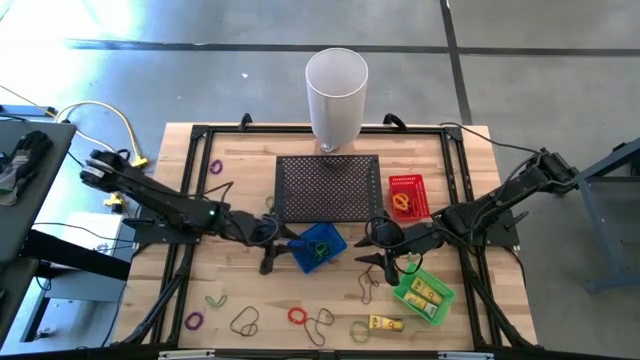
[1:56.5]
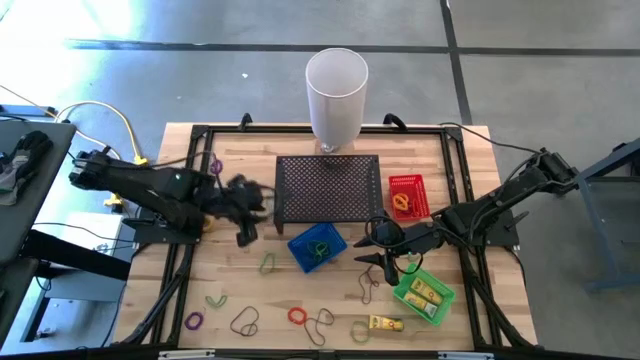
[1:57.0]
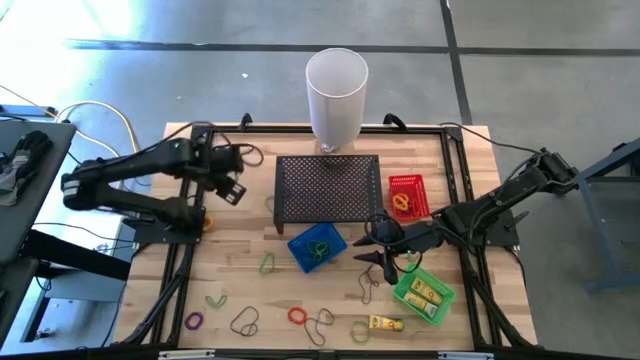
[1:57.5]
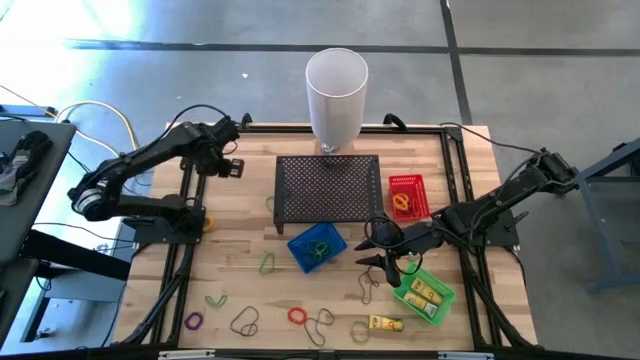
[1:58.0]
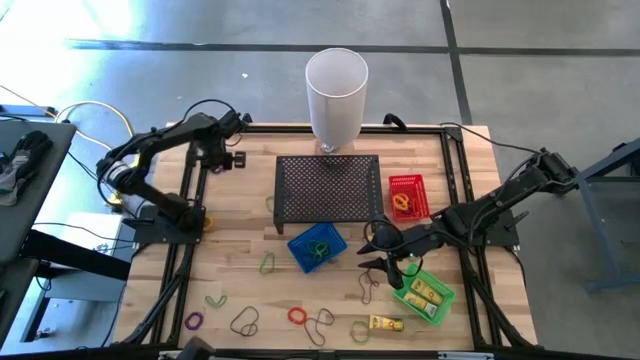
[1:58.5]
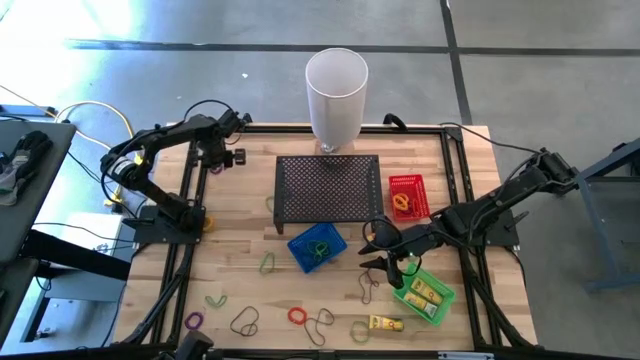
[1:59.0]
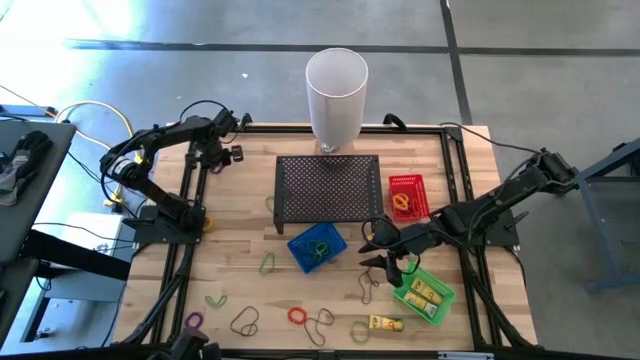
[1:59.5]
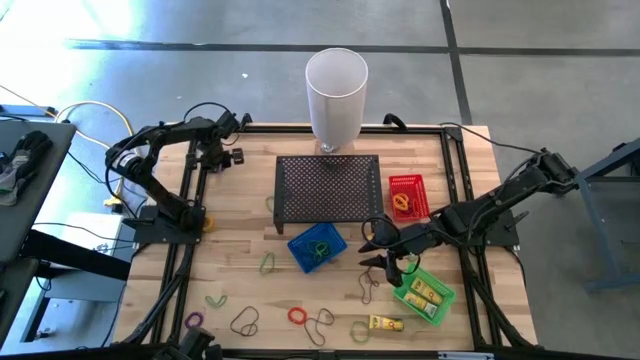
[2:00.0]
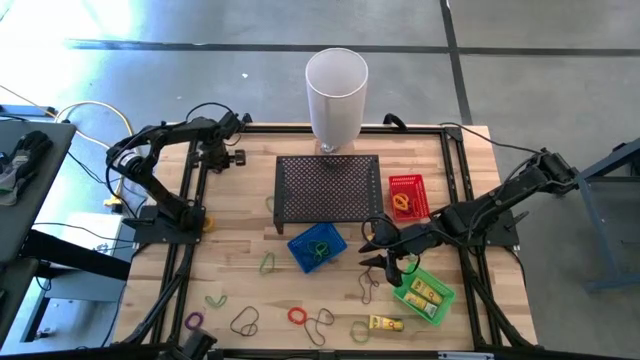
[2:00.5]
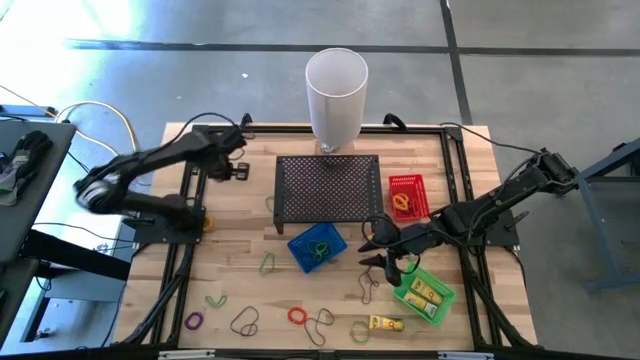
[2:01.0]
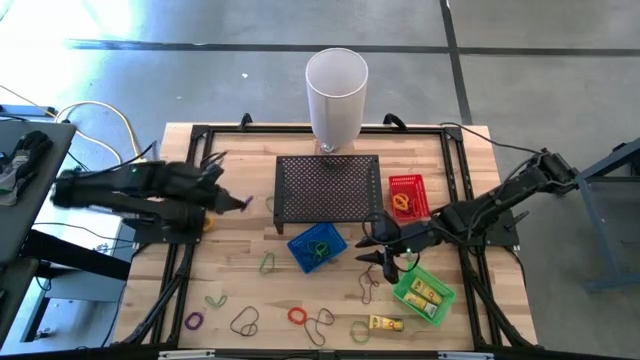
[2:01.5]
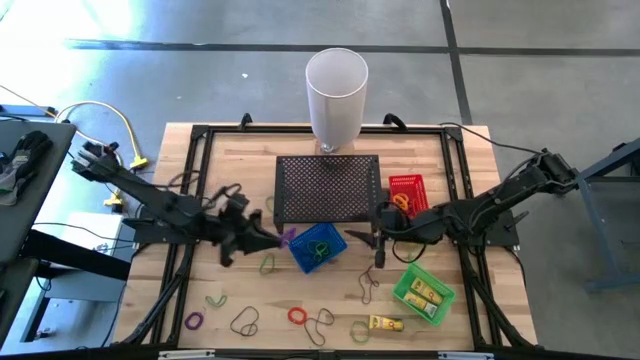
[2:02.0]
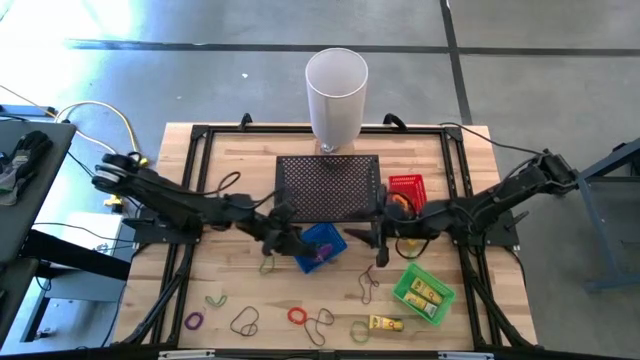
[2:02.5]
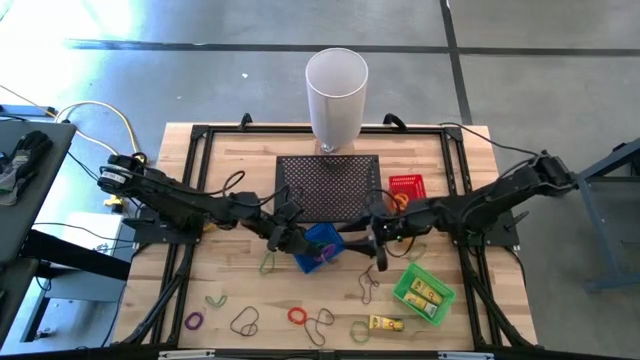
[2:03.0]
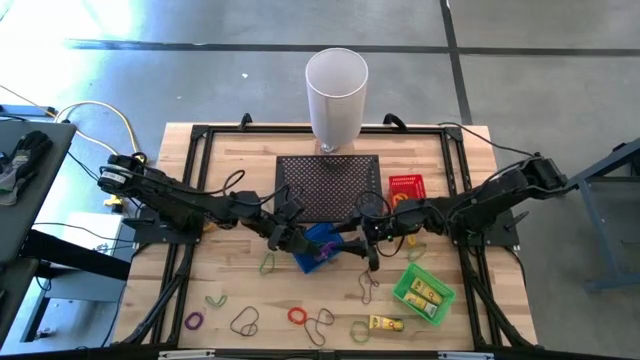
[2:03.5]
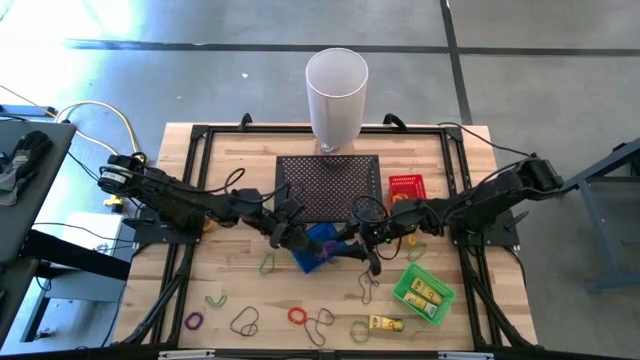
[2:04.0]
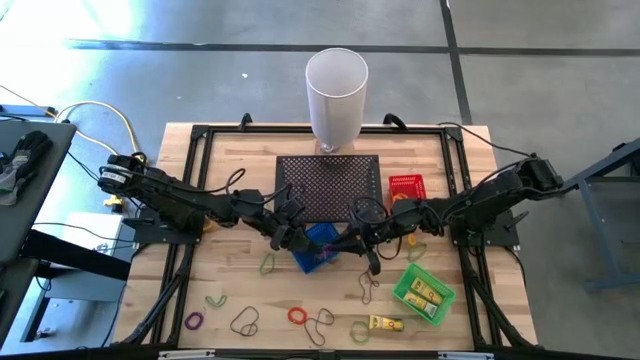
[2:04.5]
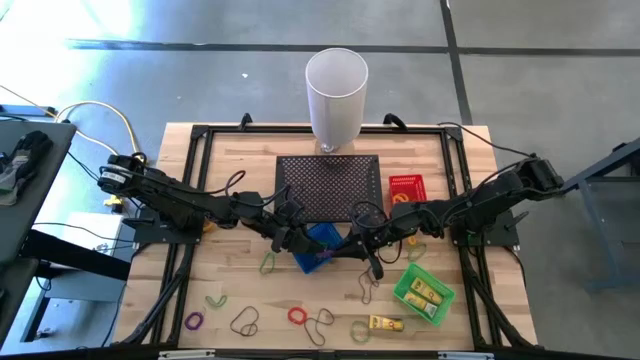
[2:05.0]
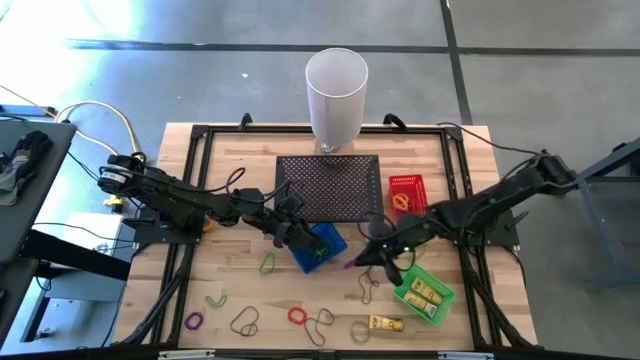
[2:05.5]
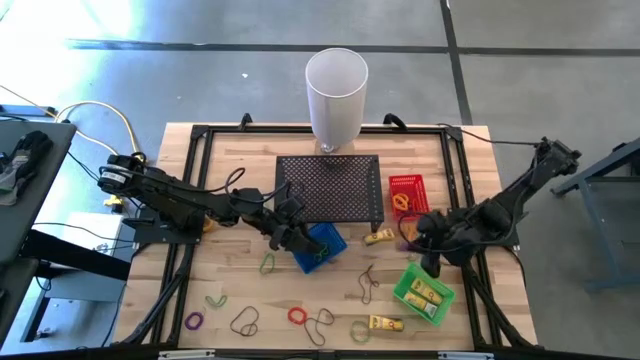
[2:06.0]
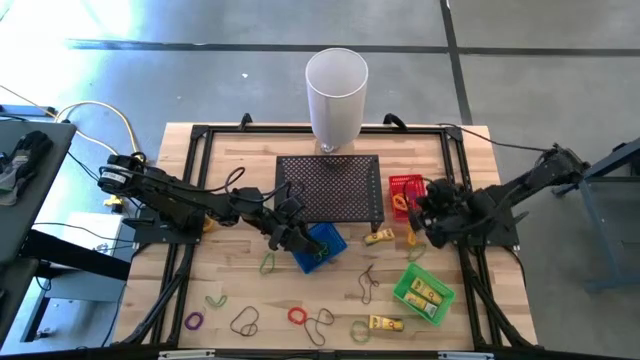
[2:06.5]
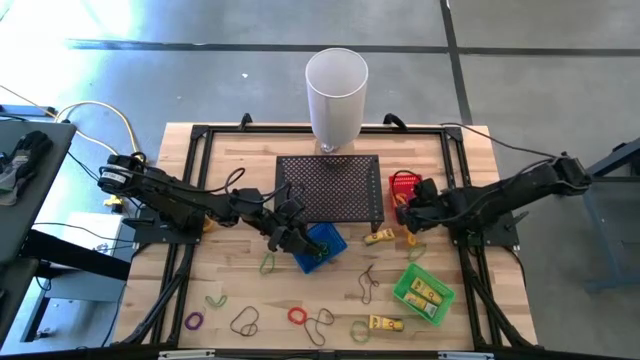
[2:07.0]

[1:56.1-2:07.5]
Task: Pick & Place Office Desk Supplies
Put the violet spring keychain into the red bin

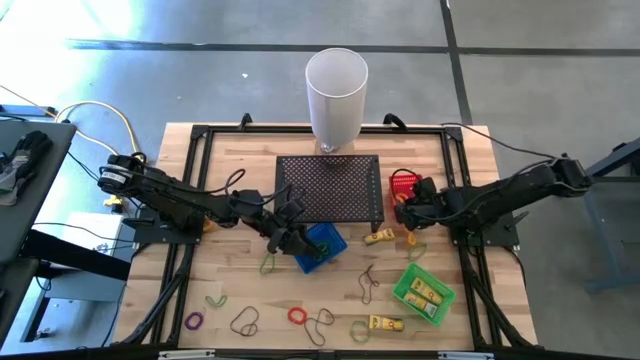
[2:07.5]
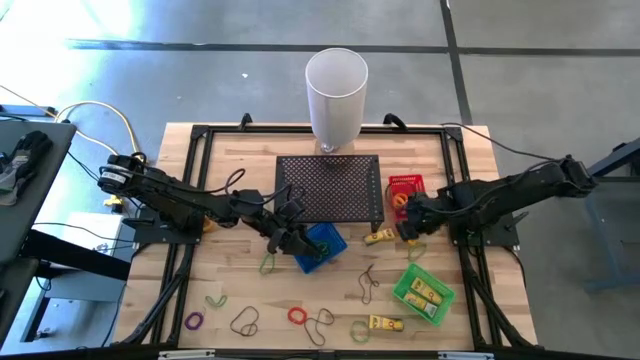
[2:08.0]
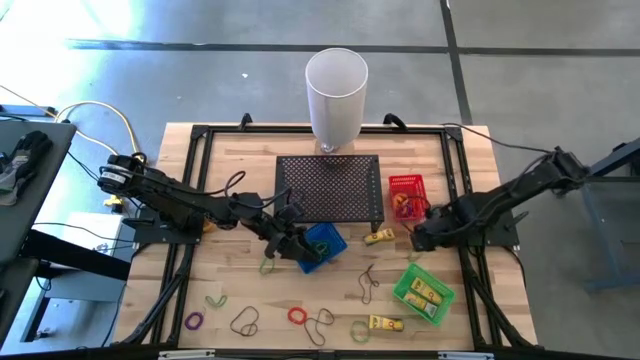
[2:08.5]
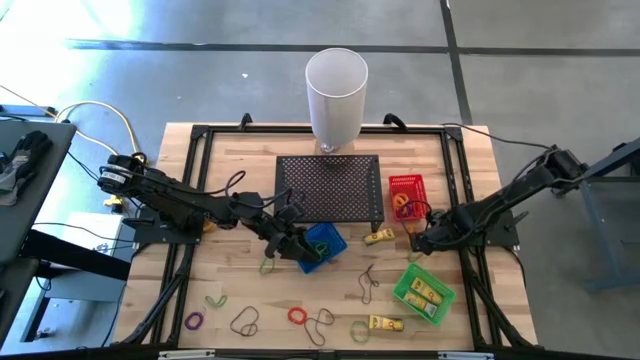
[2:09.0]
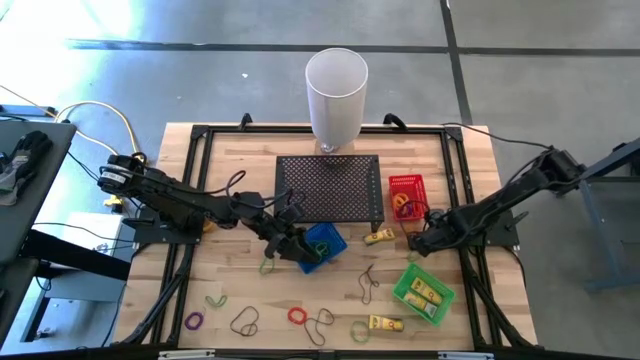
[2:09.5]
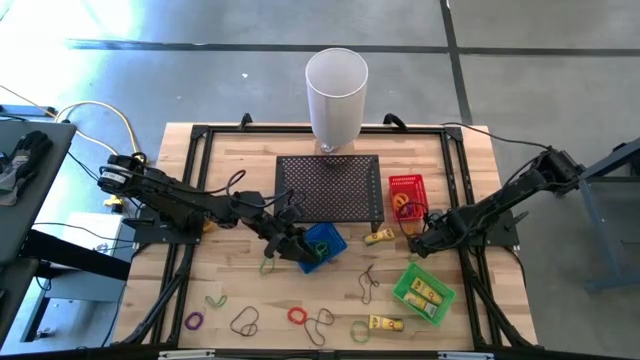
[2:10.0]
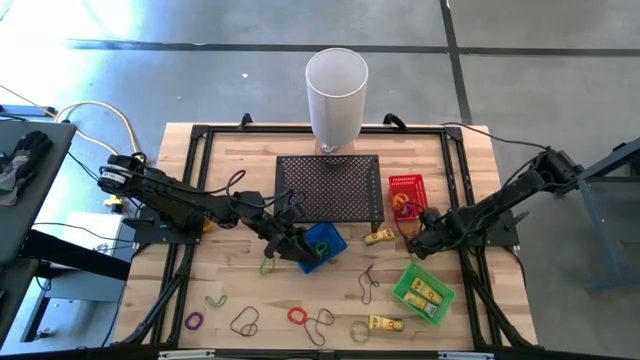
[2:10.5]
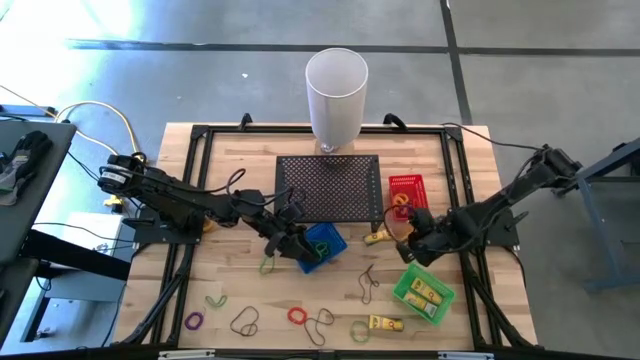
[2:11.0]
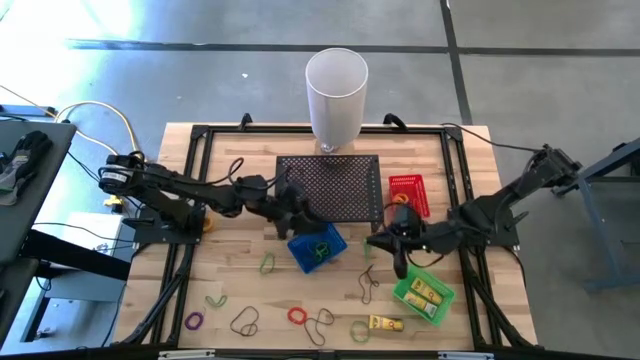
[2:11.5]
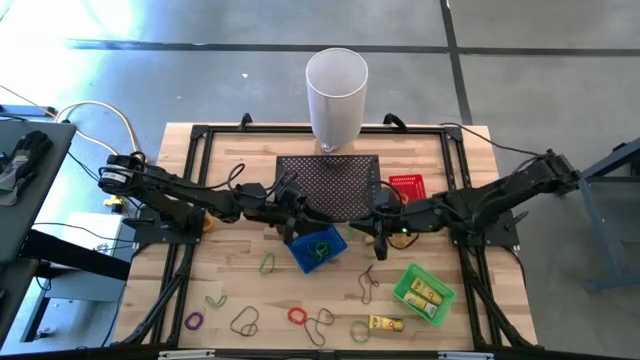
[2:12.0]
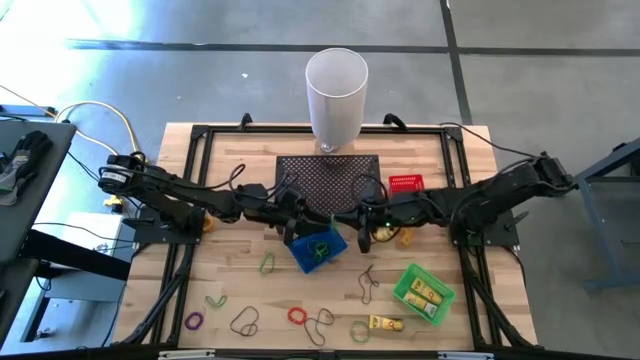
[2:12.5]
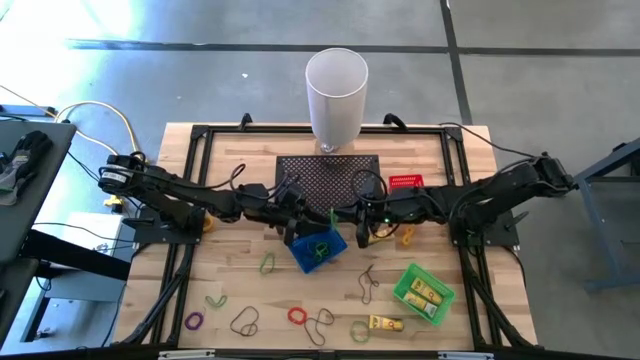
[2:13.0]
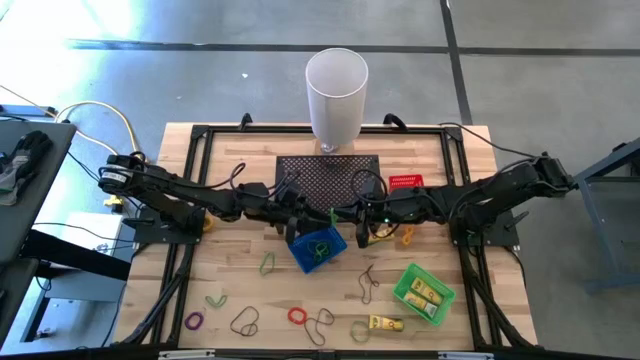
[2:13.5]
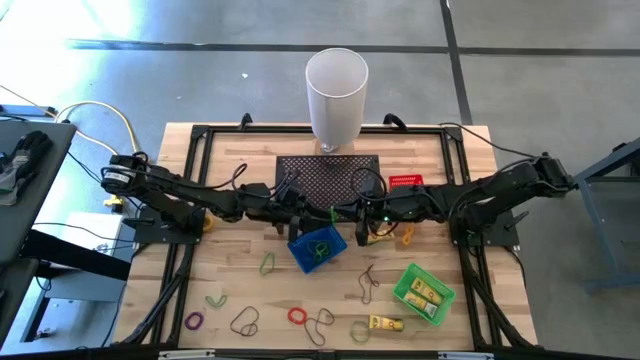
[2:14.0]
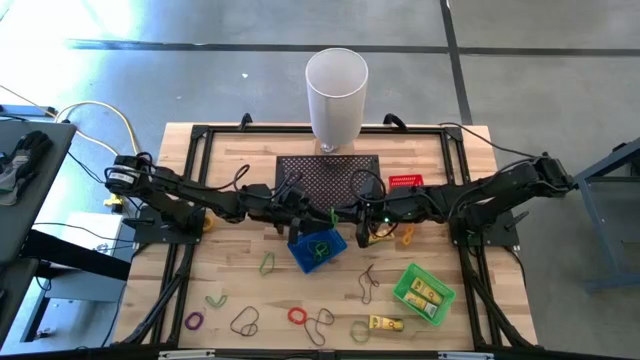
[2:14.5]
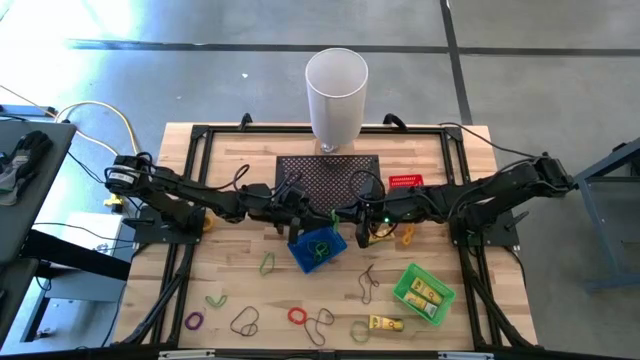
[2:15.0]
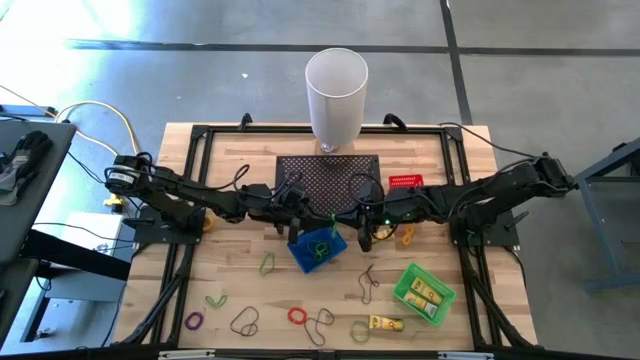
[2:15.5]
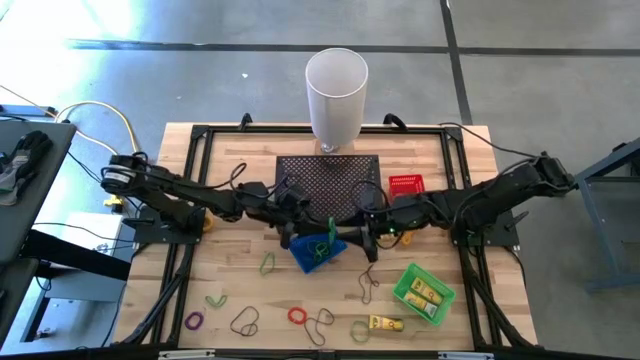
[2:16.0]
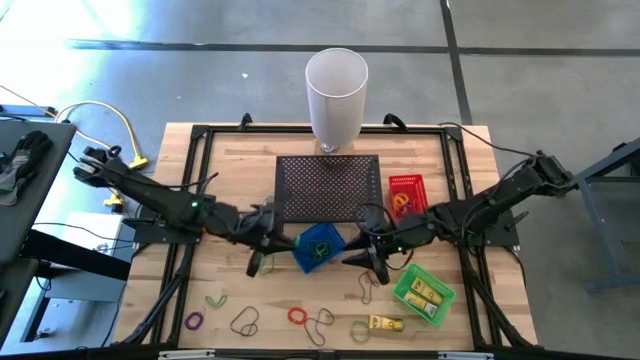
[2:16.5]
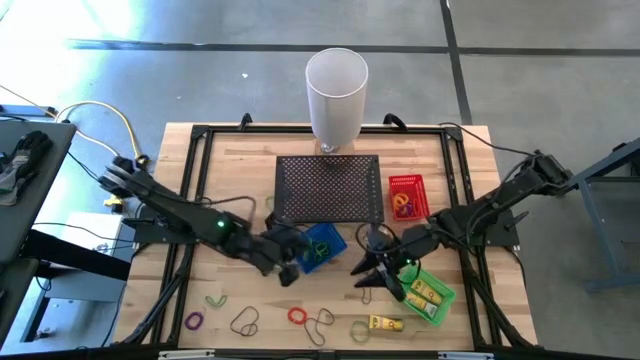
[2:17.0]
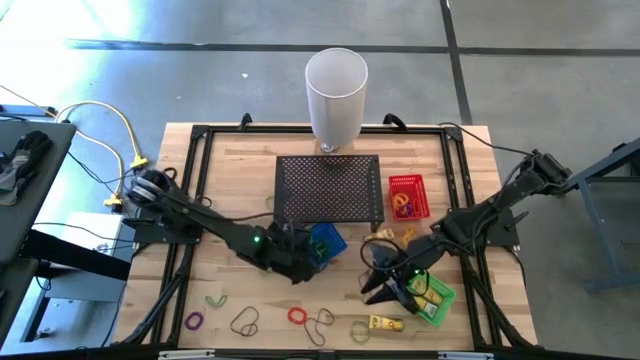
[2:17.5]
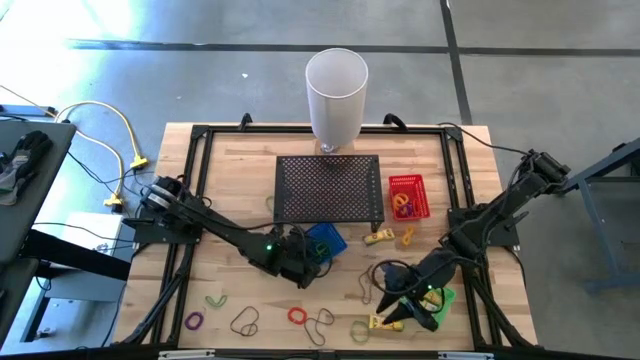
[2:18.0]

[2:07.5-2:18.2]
Put the green rubber band into the blue bin
